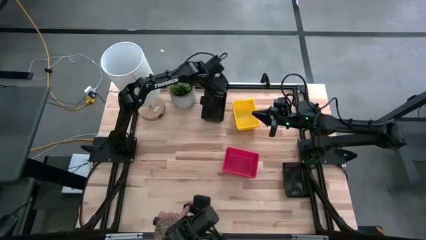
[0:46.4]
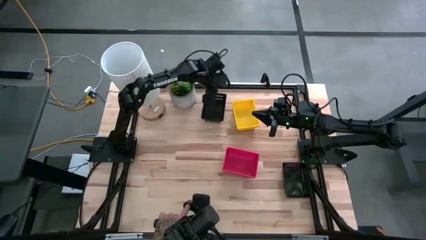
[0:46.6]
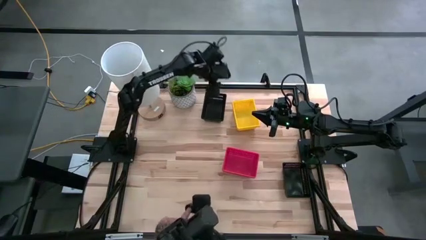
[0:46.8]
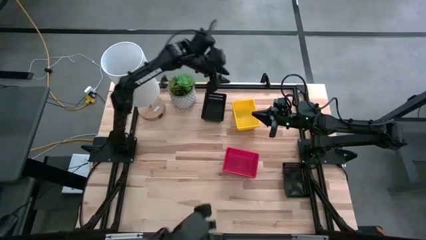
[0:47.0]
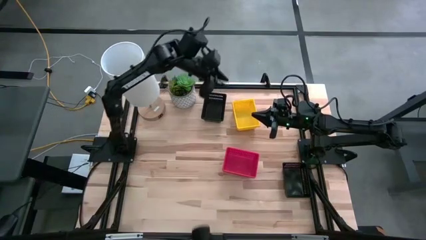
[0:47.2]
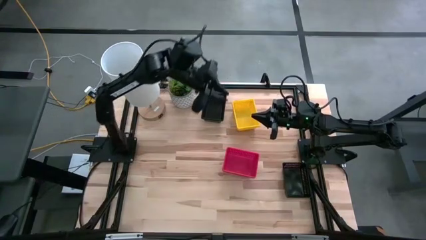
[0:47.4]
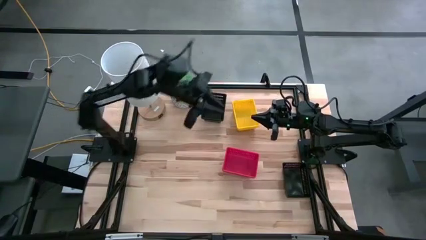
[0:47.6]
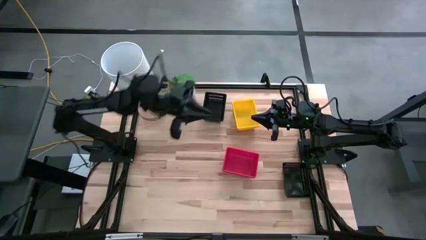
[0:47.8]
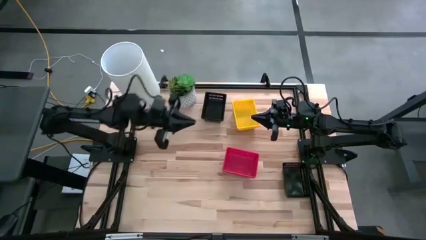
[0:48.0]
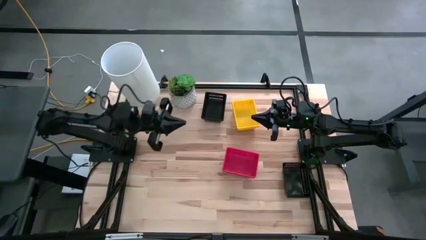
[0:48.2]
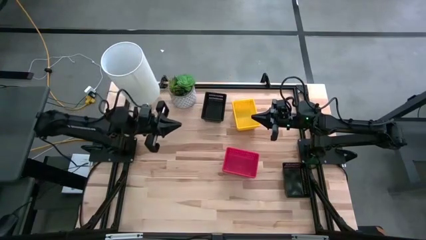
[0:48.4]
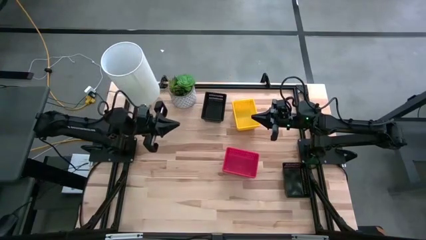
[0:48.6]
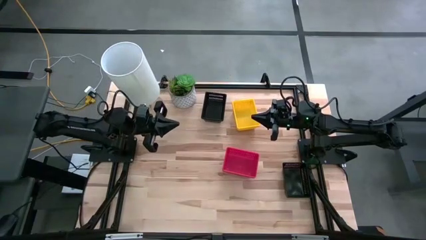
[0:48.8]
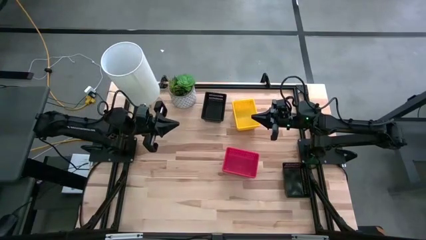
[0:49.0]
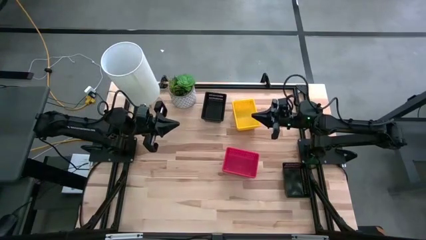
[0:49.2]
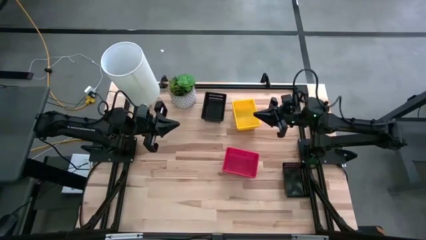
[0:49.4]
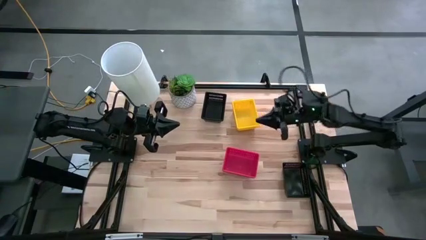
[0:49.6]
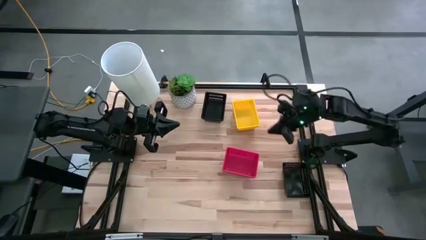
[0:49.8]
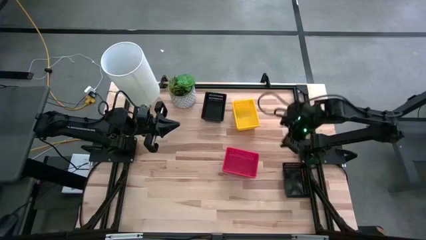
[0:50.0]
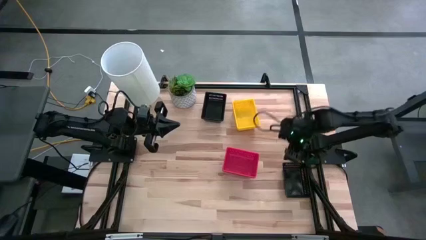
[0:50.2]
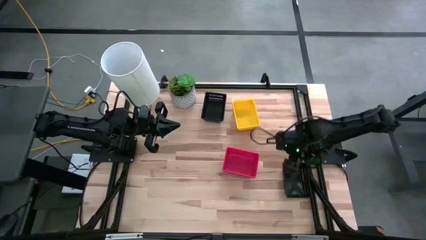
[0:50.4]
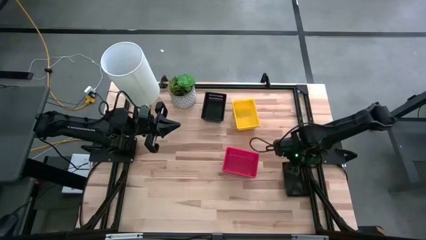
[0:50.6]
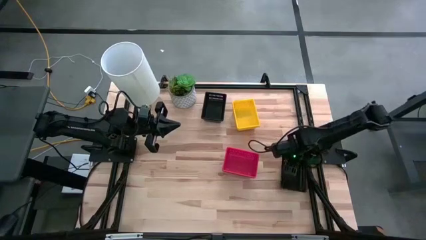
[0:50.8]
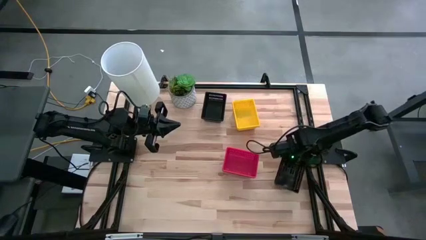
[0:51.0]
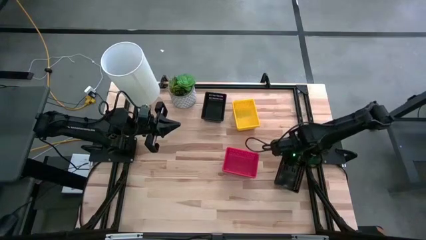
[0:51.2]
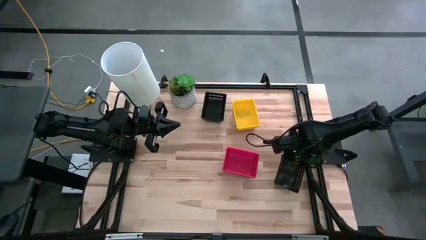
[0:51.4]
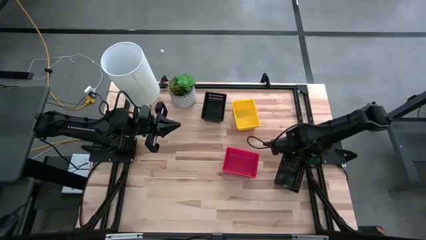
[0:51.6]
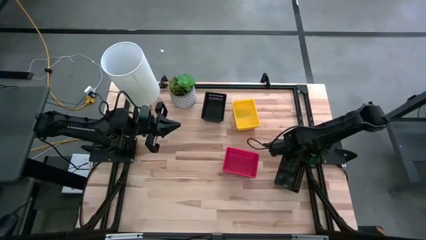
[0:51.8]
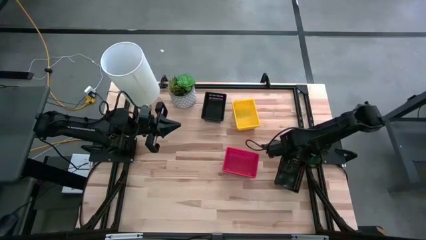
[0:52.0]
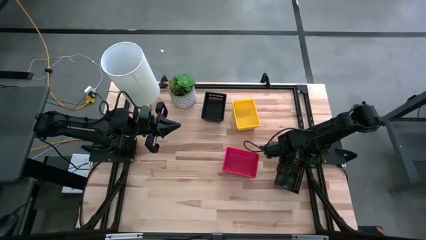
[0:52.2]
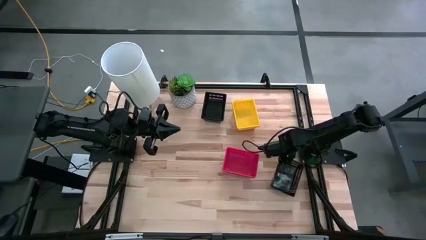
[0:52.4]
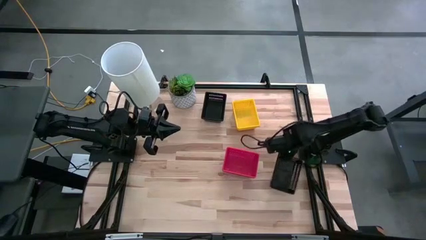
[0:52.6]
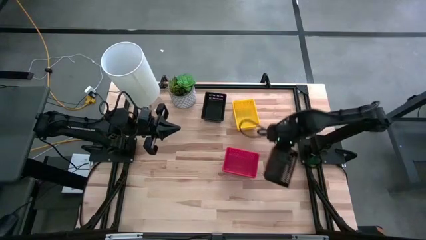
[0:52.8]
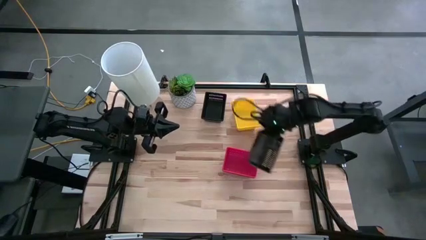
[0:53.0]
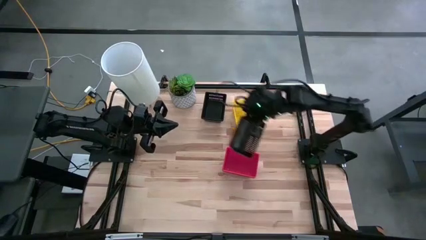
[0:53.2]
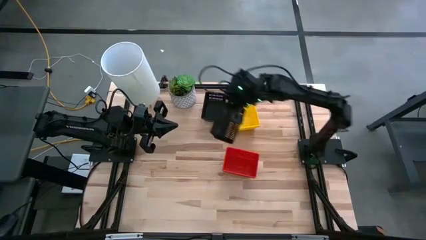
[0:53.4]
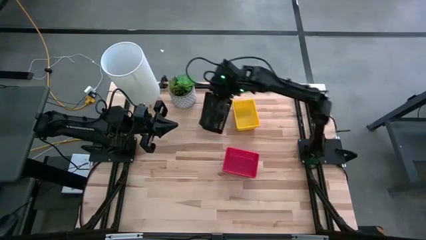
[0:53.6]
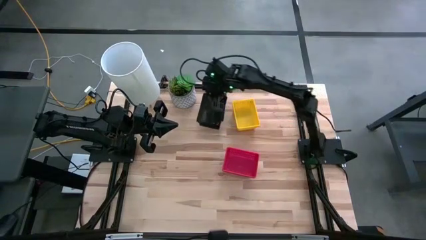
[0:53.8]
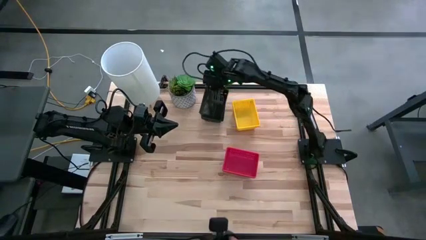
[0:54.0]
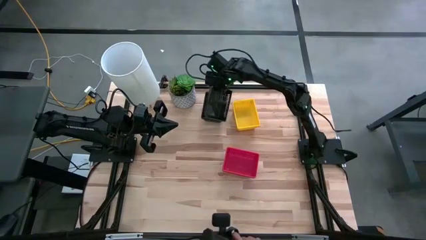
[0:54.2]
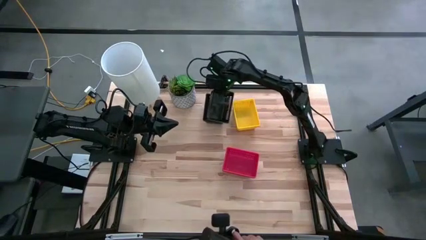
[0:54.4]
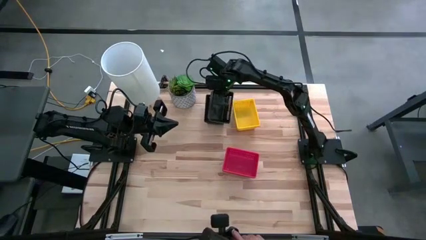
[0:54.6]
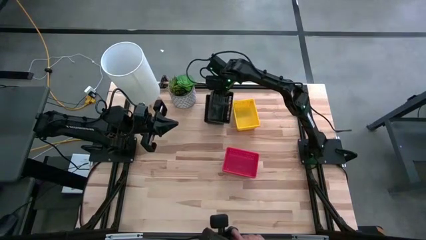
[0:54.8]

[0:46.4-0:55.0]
Stack the bottom black bin on top of the top black bin on the table

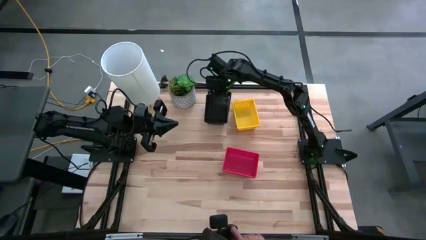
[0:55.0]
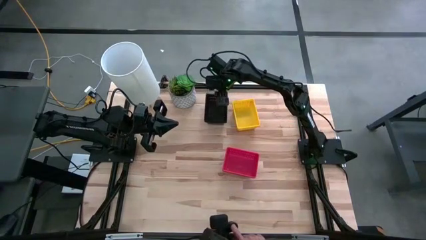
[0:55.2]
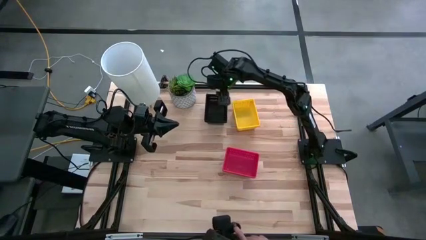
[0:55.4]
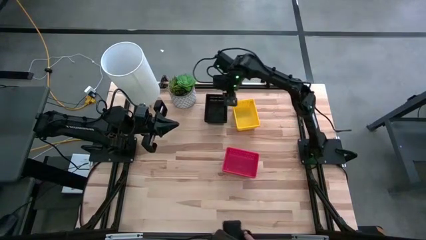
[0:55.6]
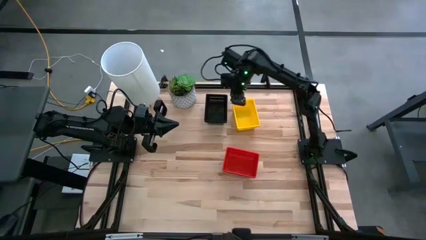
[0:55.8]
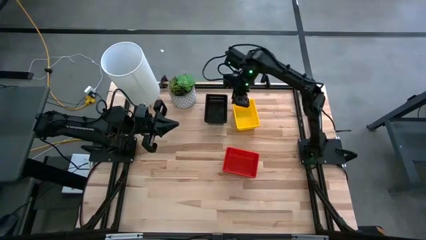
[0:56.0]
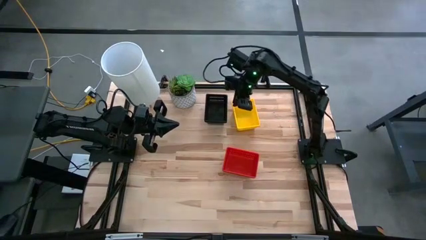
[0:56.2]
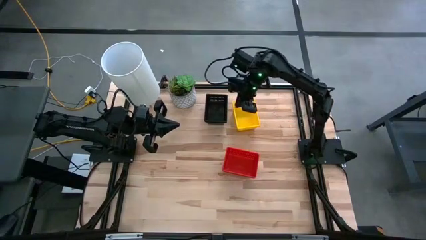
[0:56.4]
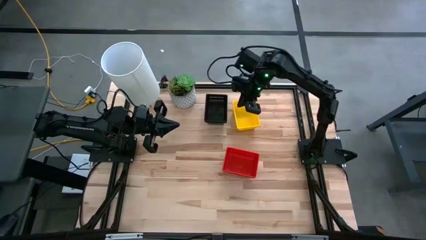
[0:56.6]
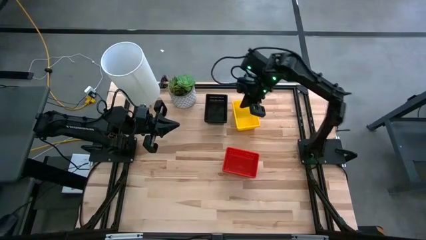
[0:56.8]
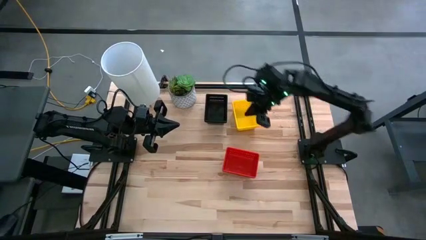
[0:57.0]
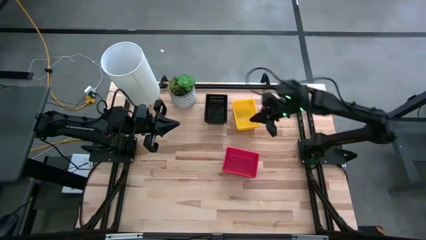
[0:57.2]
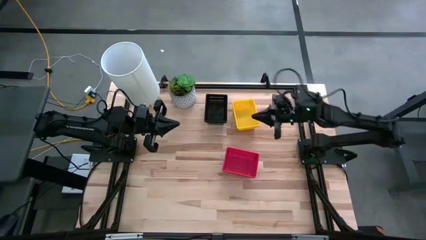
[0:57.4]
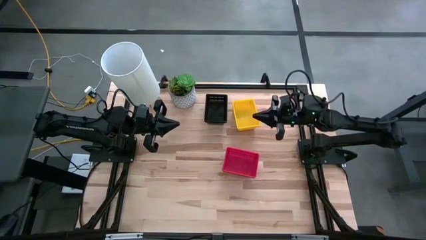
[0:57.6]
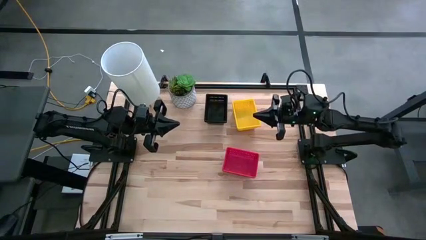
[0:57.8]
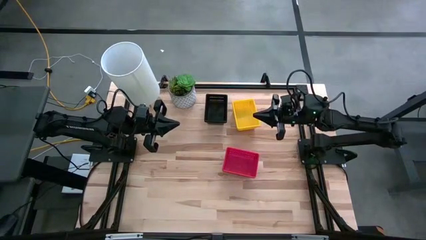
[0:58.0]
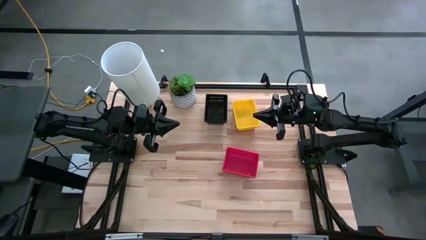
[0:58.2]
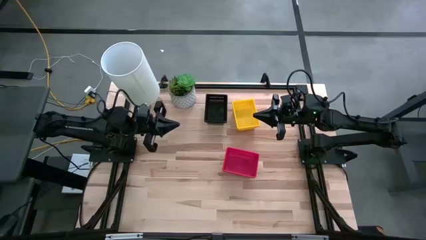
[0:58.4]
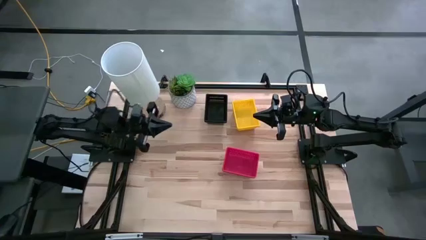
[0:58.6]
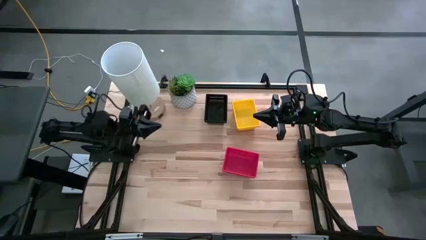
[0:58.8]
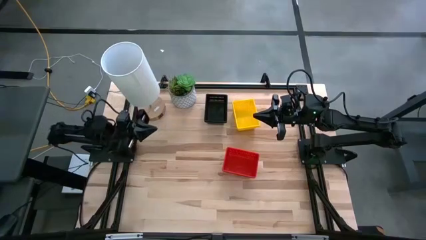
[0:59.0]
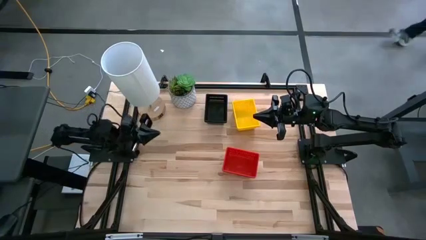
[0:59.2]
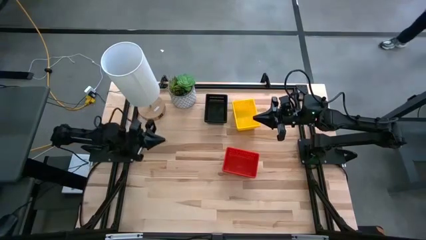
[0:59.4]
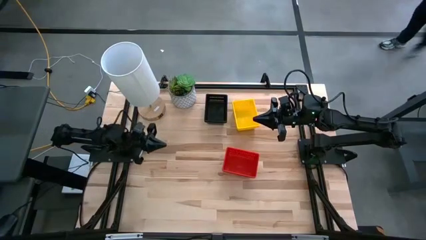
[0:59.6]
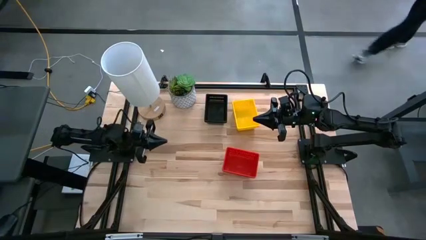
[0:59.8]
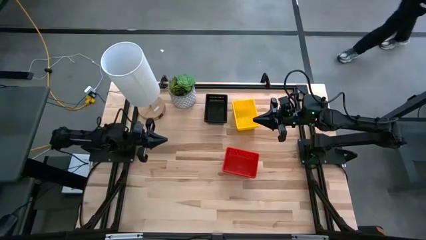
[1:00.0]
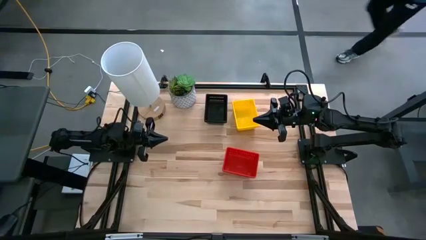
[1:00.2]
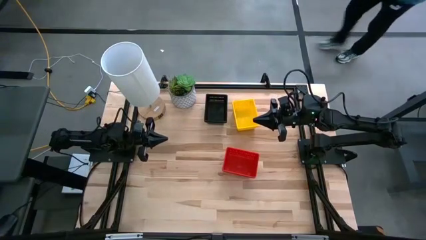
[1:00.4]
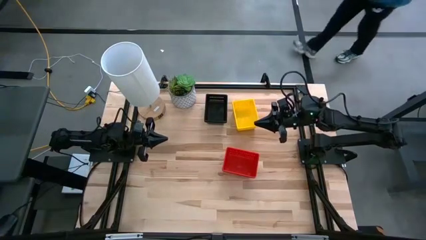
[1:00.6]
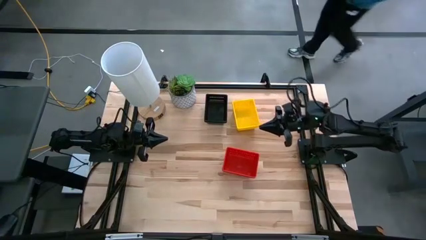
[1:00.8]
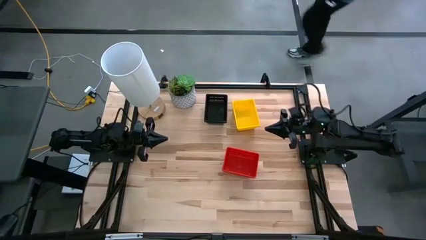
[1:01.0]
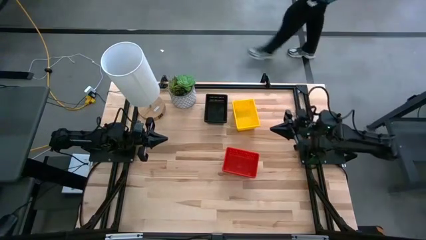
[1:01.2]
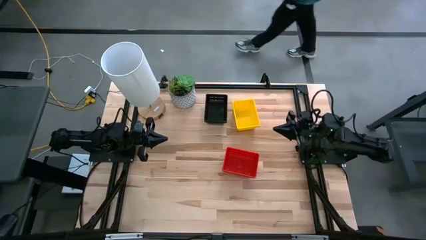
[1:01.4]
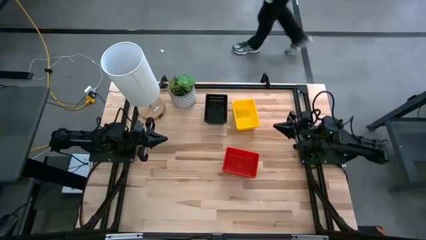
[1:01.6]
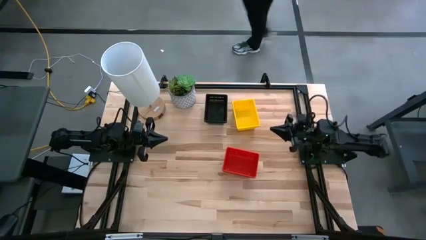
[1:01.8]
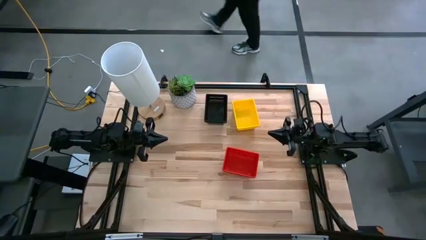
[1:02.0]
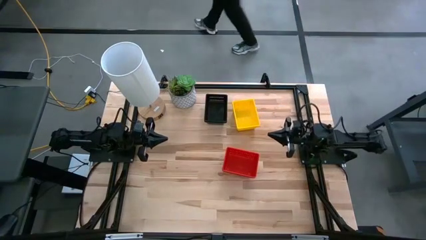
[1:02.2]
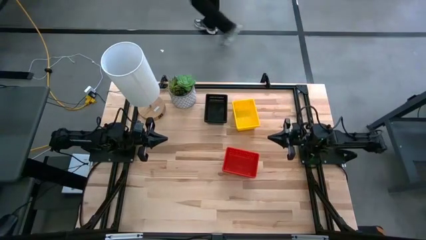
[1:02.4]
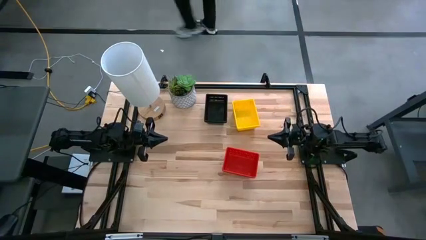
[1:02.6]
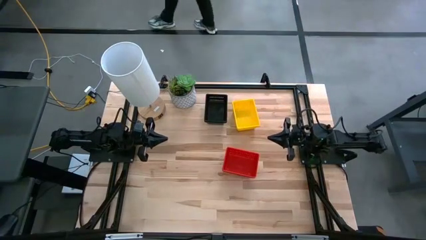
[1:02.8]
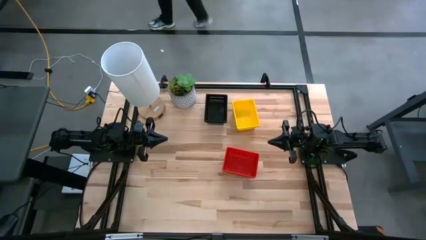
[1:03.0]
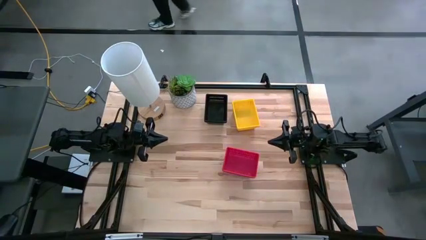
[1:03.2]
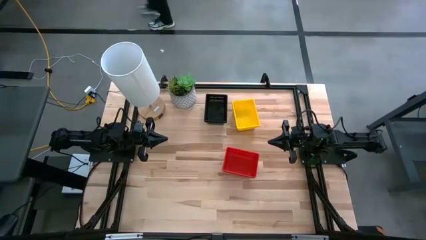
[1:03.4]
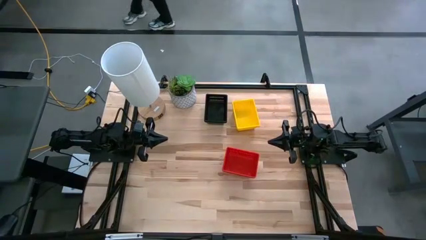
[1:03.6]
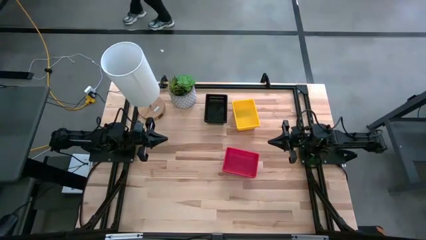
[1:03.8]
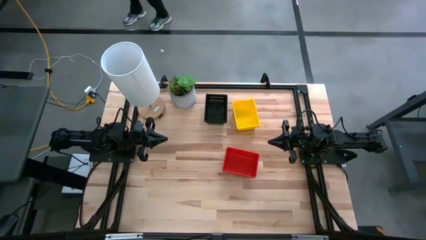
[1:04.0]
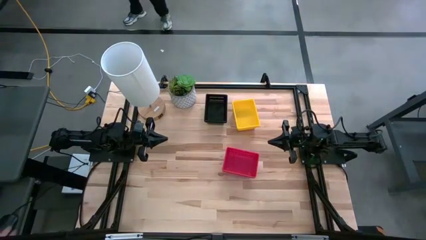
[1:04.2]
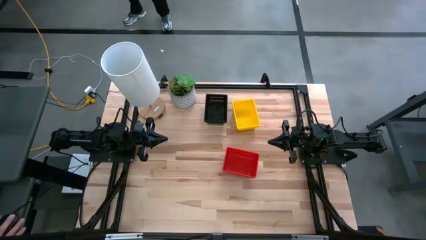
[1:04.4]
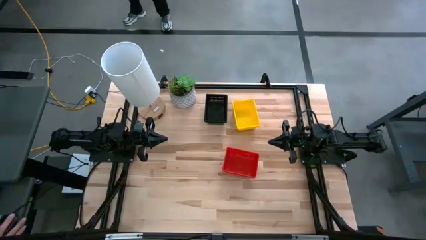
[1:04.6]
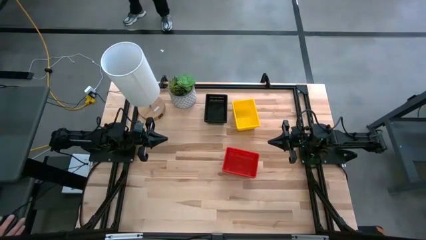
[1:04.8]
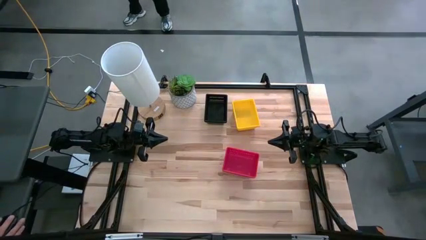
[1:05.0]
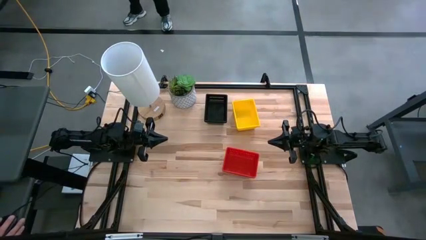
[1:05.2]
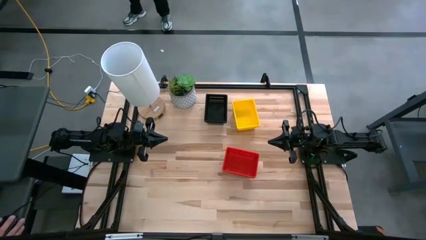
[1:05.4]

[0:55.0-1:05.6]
Return to Home Position
